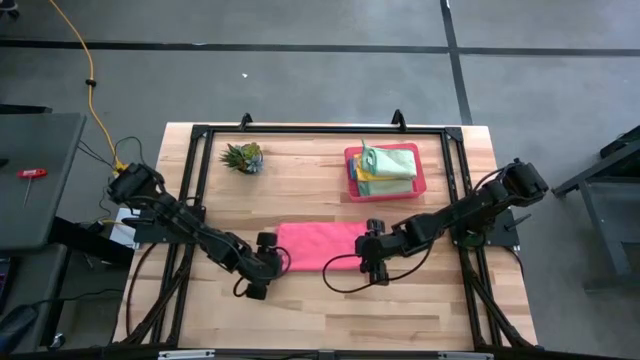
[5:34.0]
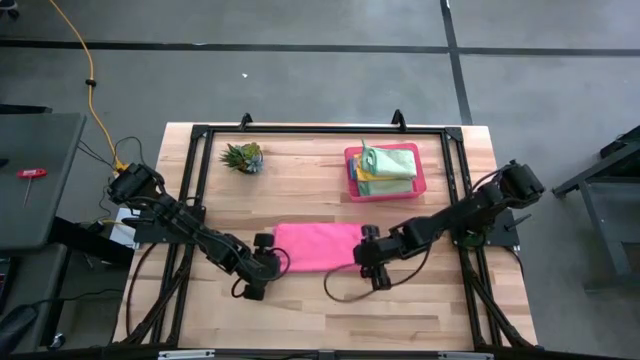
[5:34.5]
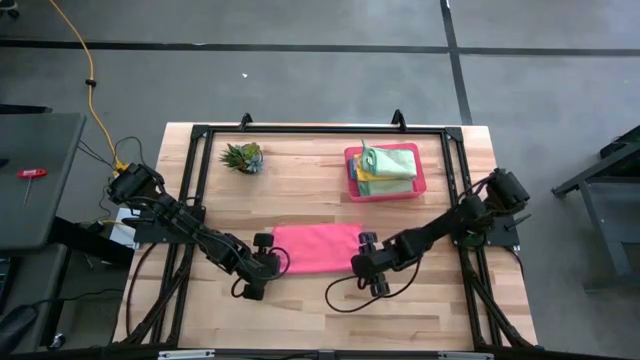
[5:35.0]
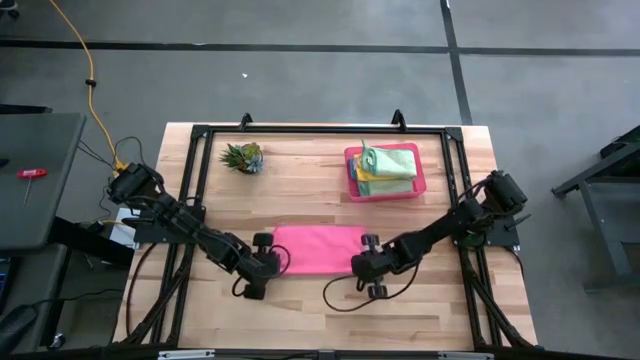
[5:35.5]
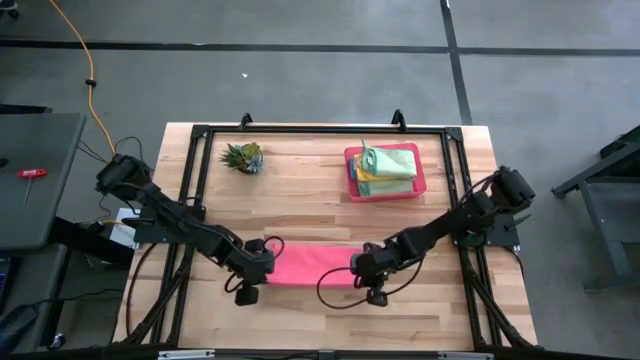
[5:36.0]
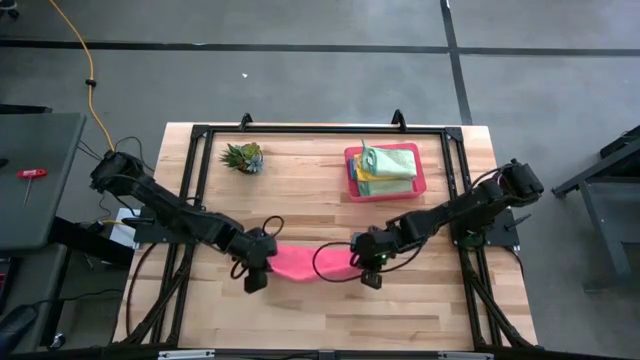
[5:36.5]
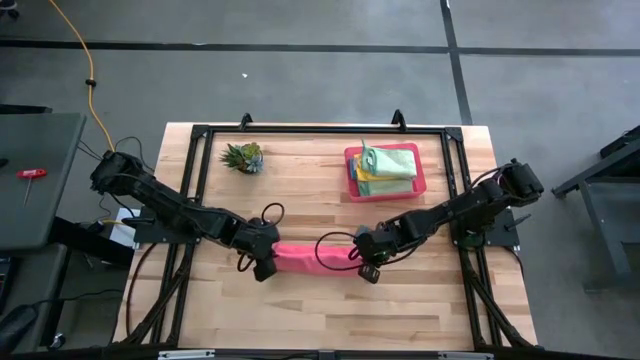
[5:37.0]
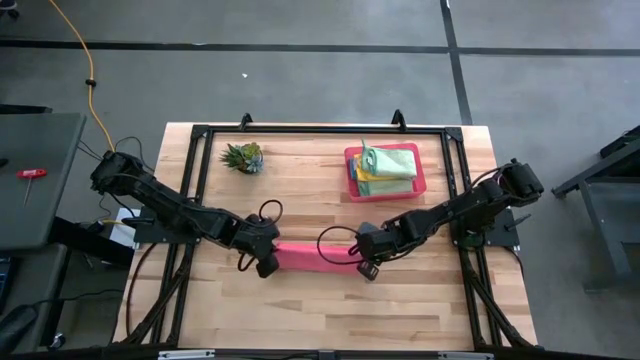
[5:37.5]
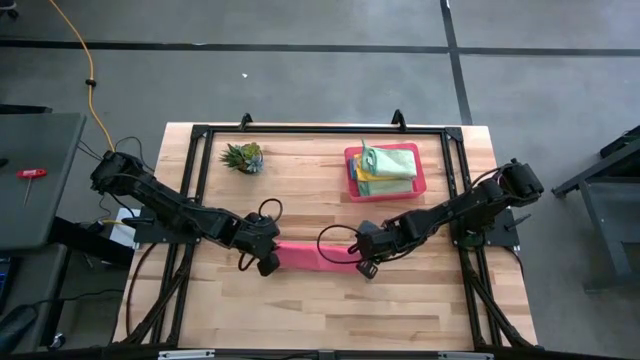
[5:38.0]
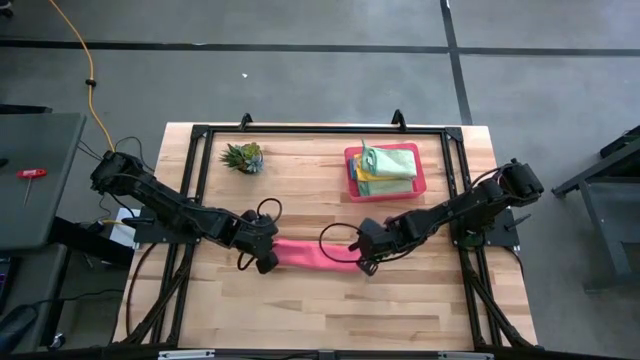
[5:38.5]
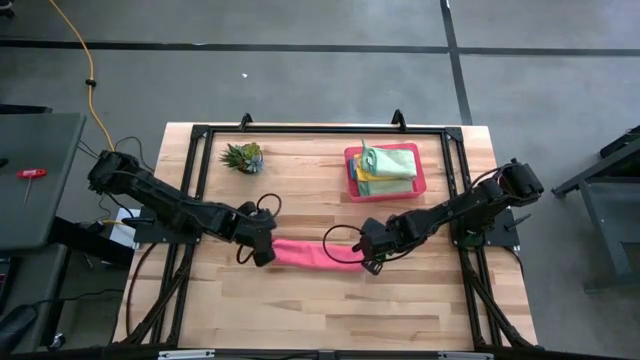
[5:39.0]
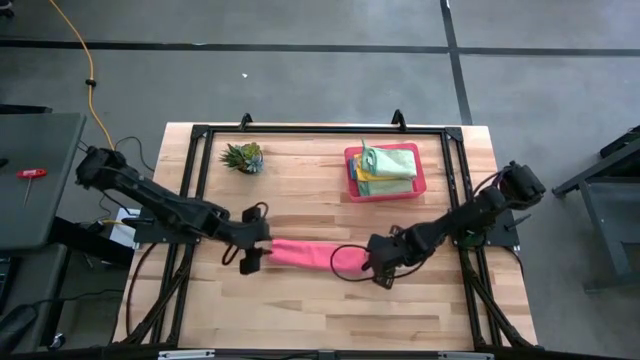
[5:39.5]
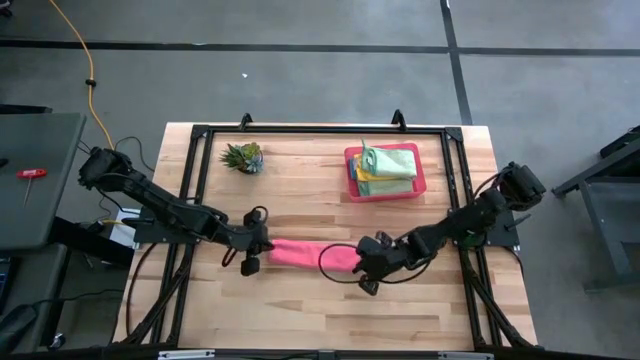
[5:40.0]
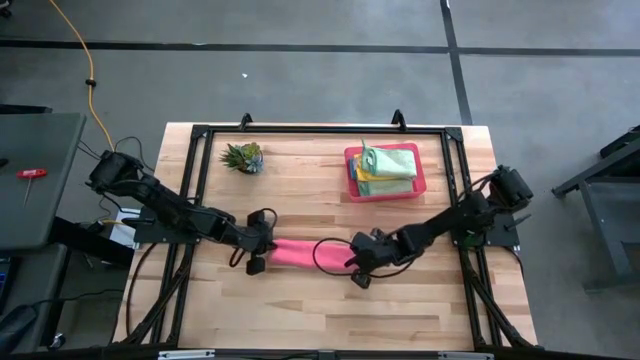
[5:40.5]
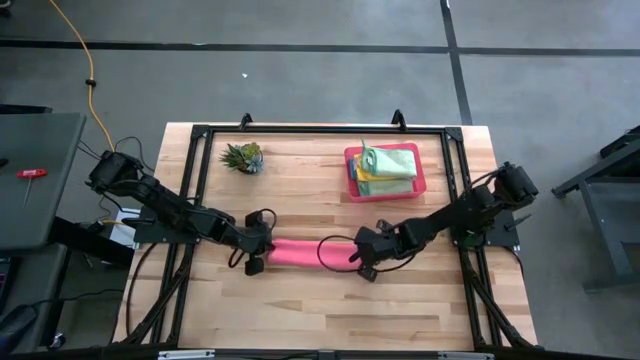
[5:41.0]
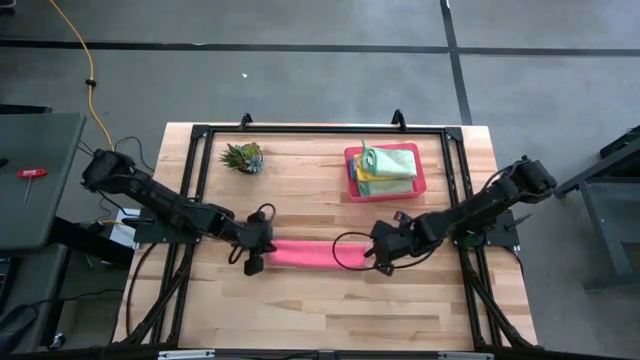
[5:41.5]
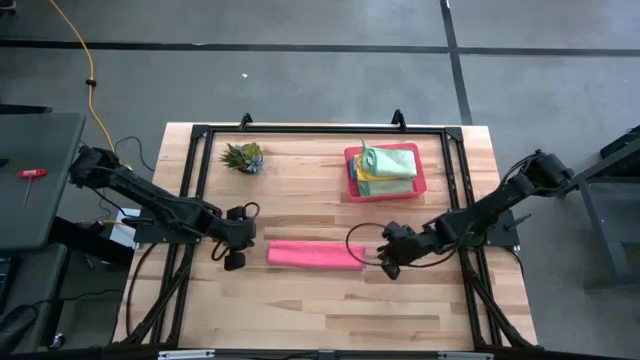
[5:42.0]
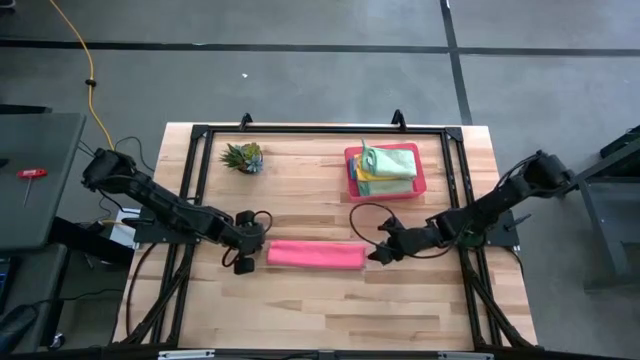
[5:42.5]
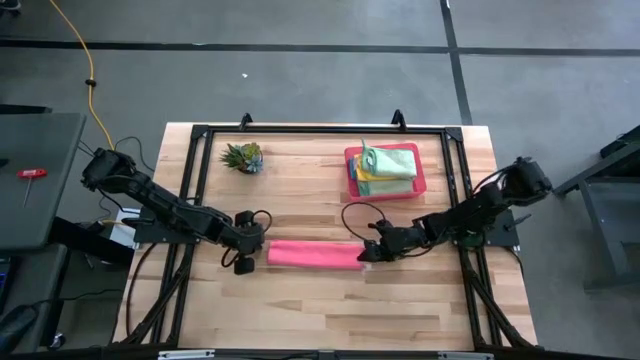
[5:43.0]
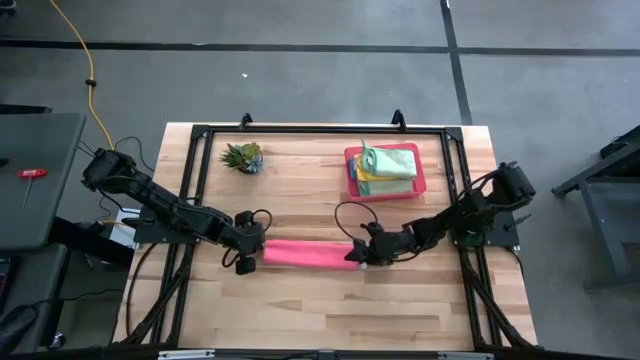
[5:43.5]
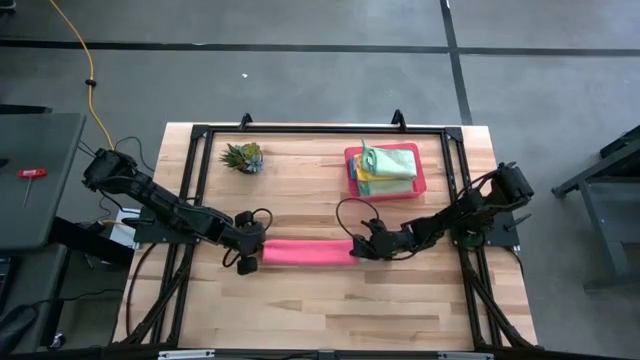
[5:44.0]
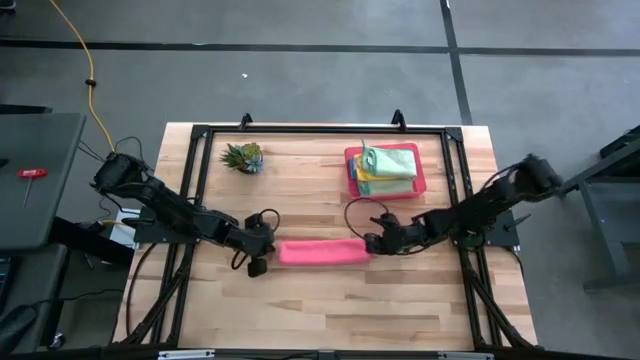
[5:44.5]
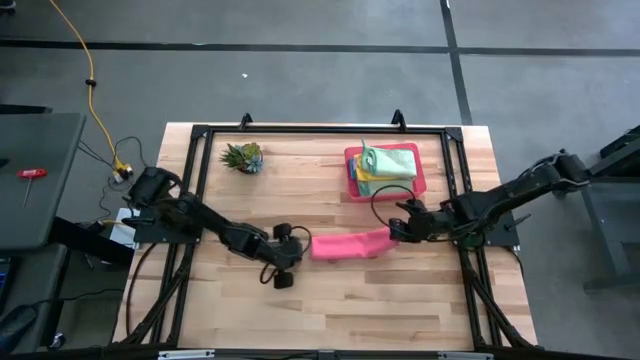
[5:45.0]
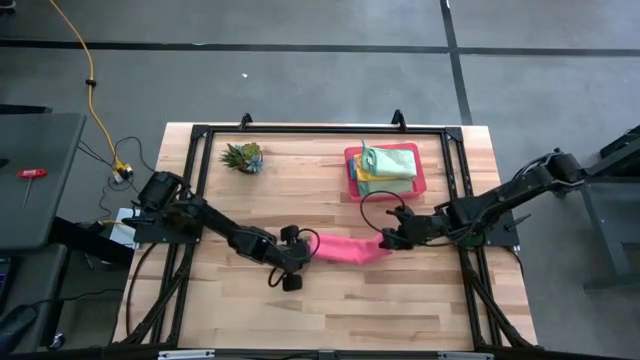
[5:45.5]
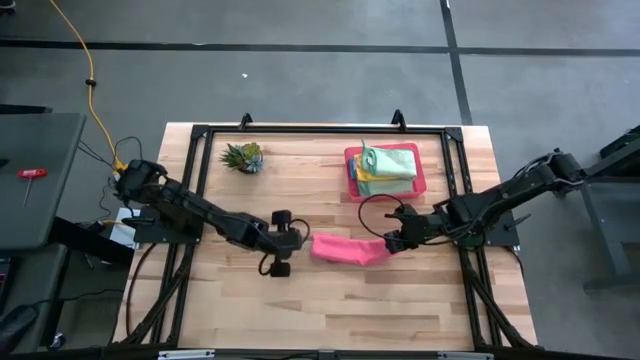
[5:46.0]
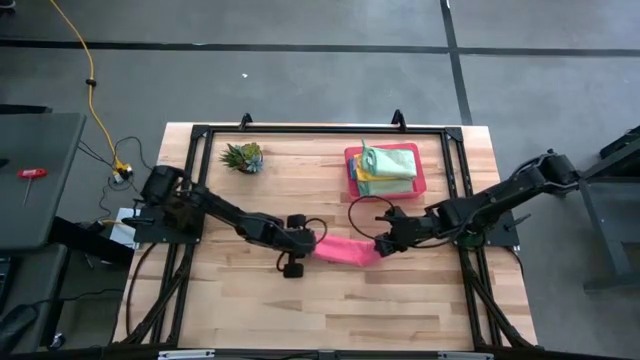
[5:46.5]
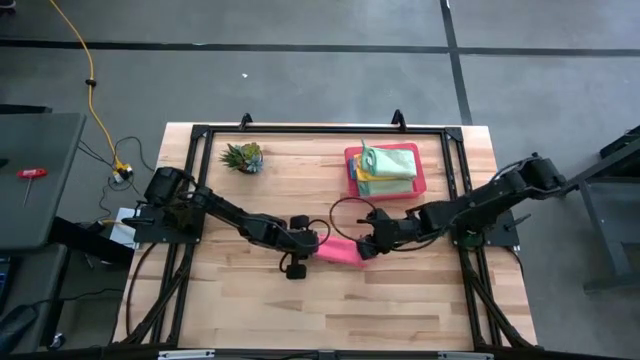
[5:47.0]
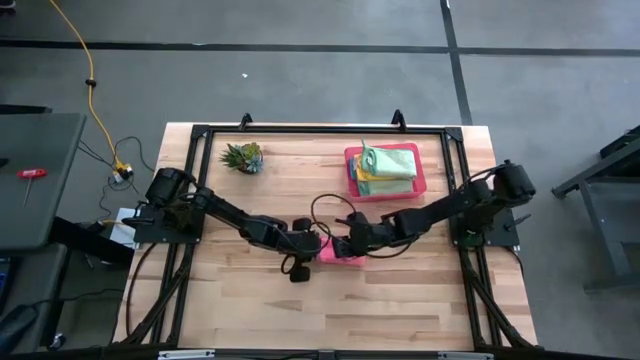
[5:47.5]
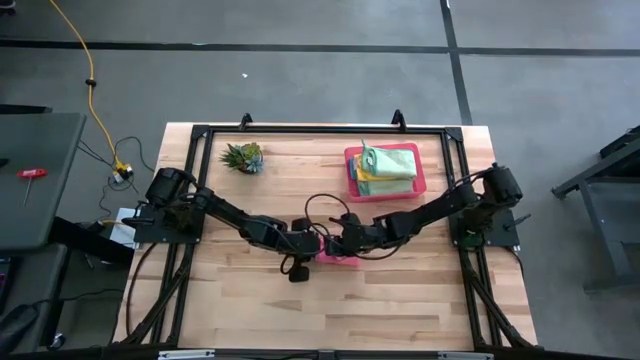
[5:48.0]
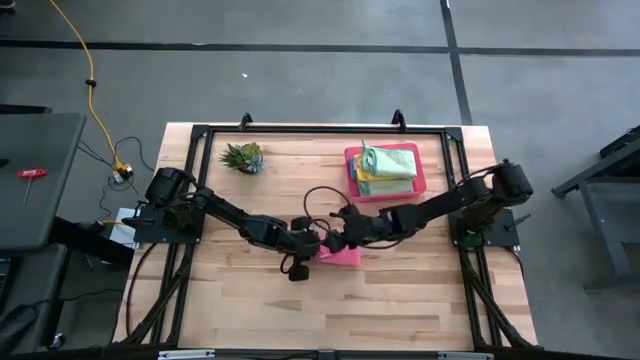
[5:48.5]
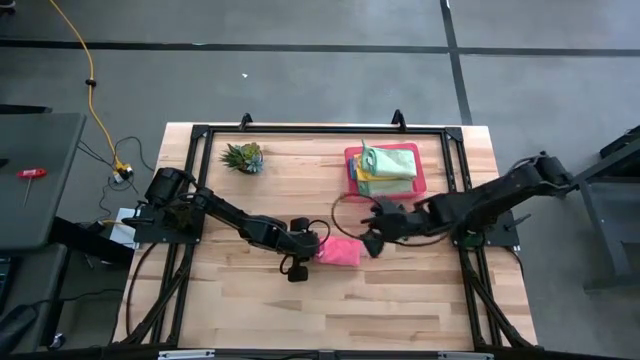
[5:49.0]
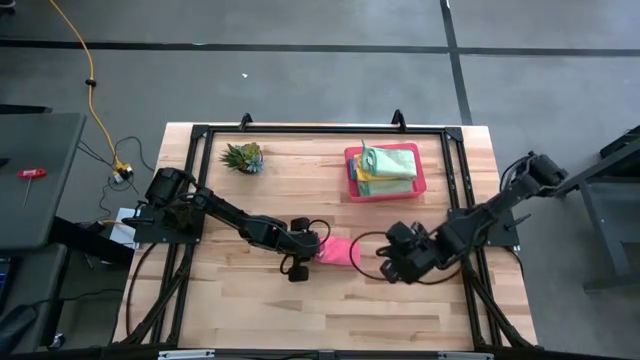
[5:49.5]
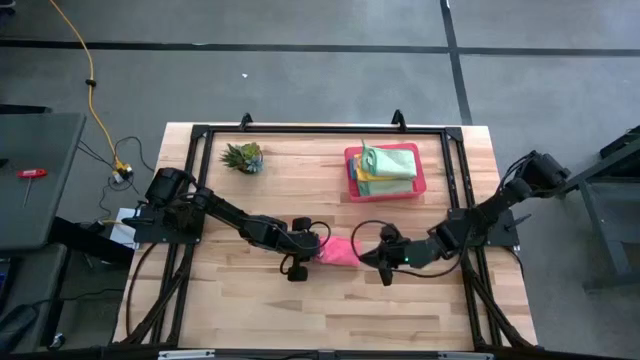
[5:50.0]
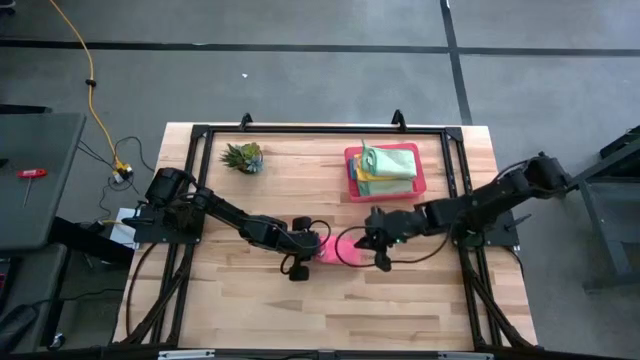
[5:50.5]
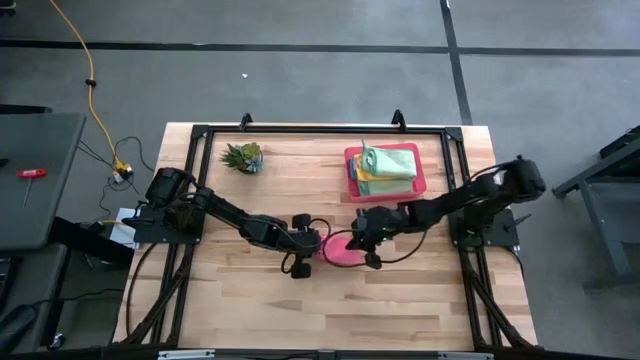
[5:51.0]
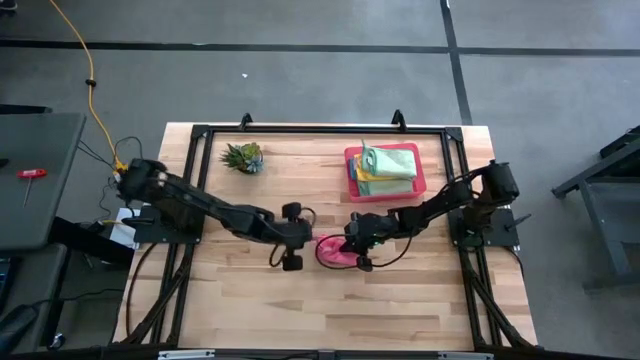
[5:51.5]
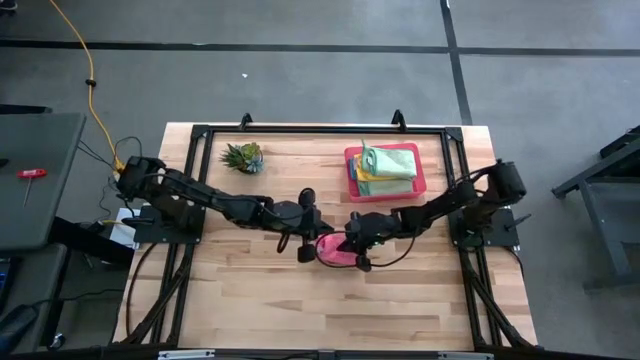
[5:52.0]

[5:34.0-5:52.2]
Task: Fold microfiber towels
Fold the pink microfiber cloth
